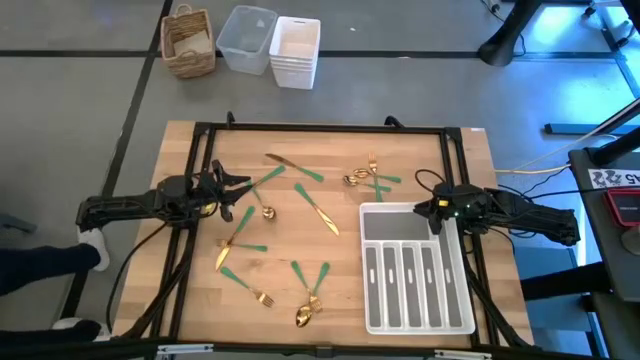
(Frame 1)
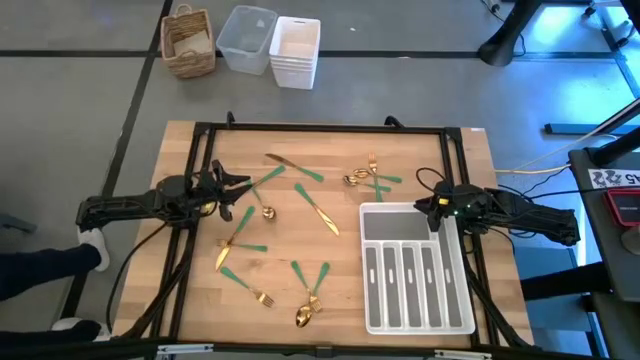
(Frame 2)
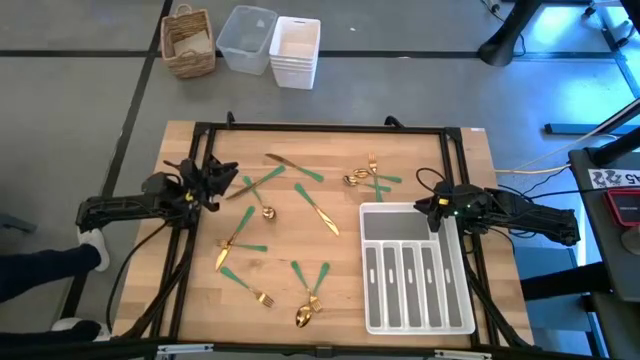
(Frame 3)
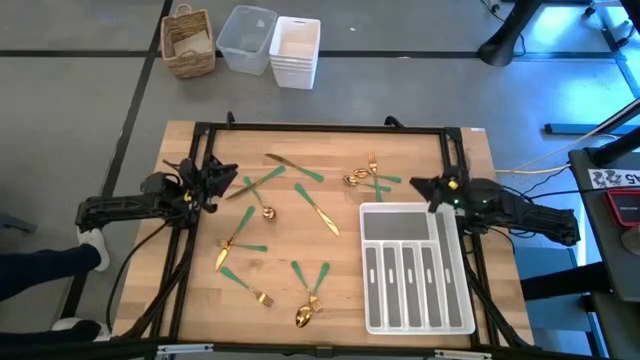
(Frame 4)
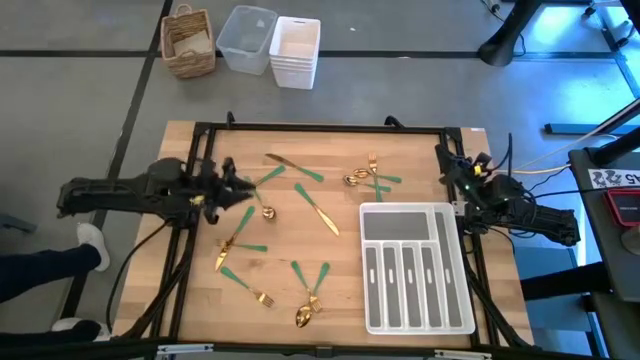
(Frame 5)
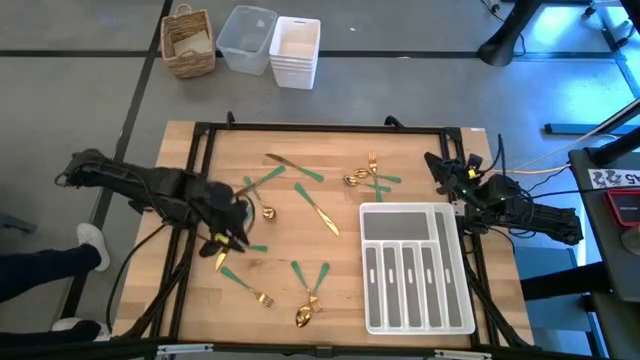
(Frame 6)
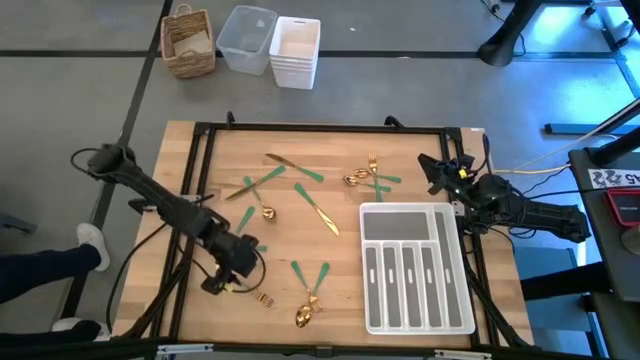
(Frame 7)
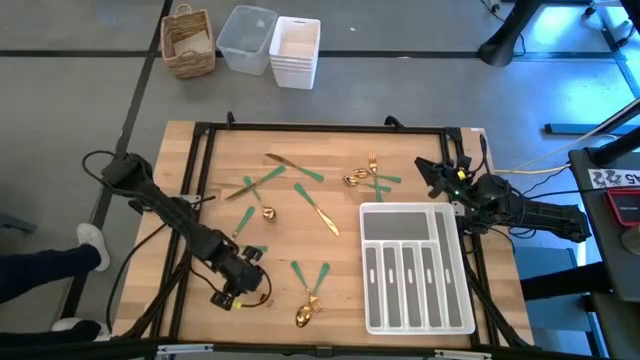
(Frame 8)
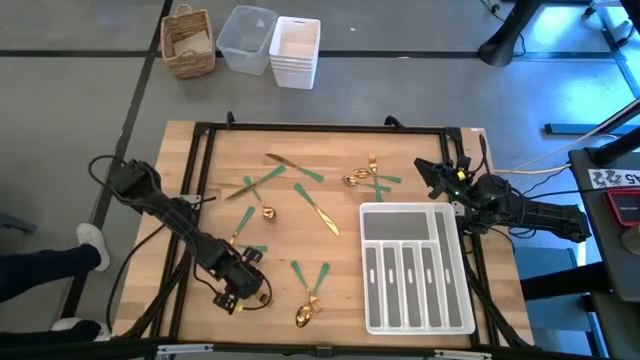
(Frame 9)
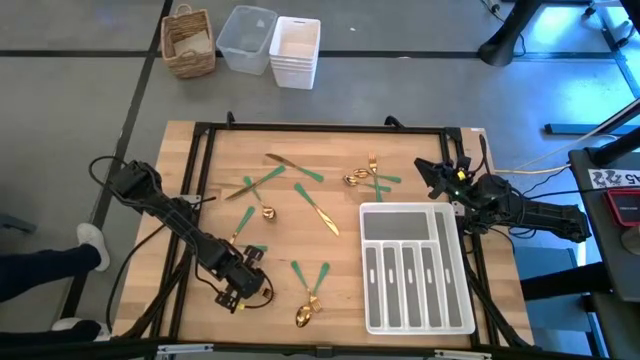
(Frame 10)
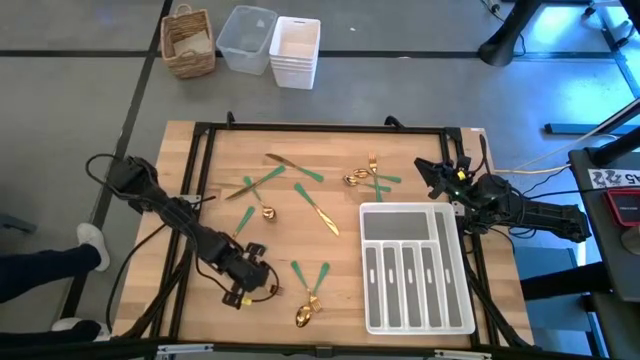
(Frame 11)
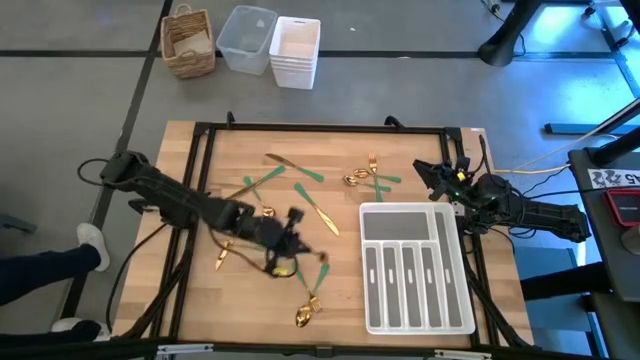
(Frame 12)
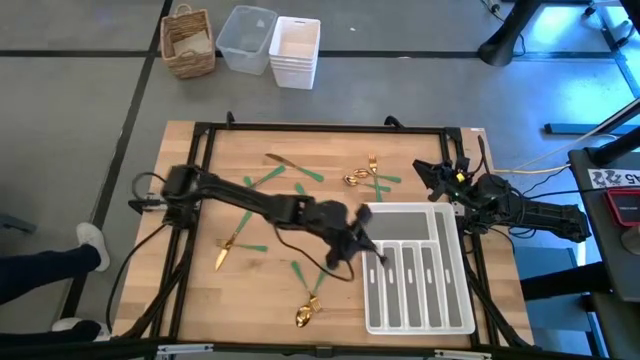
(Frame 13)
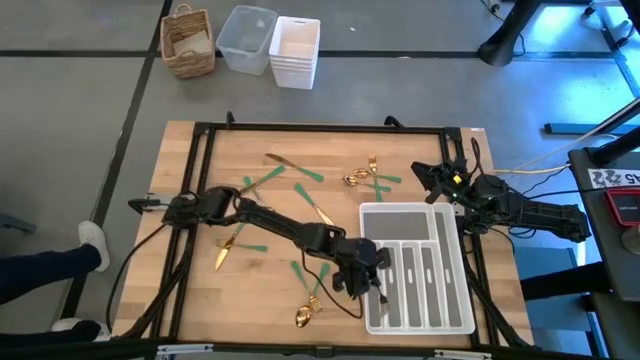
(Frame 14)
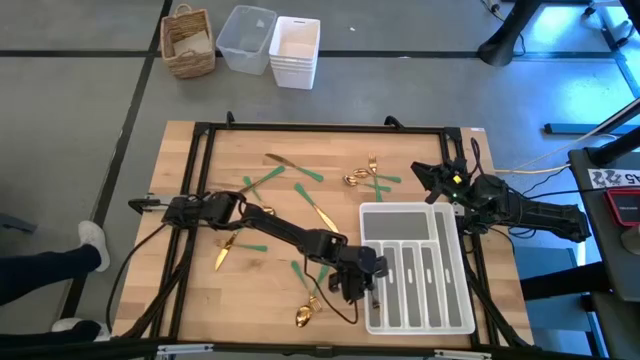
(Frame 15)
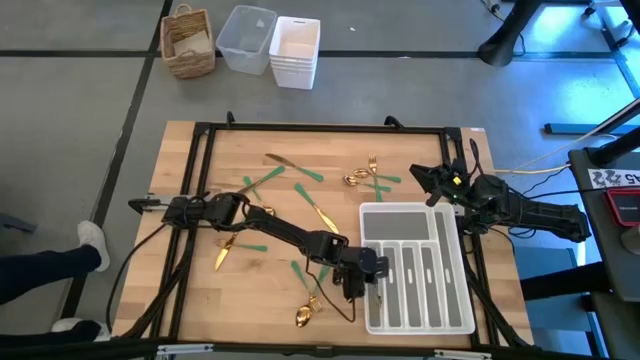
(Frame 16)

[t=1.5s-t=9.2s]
Task: Sort silverware
Put the green fork in the white silverware tray

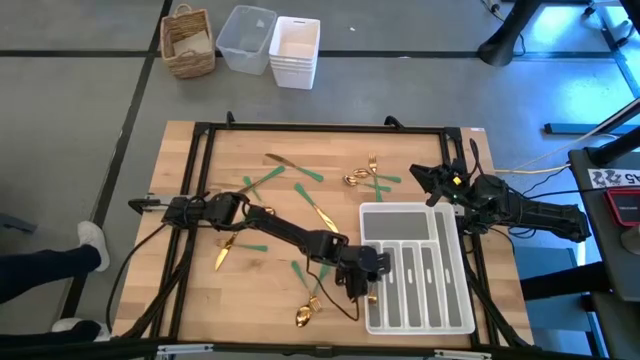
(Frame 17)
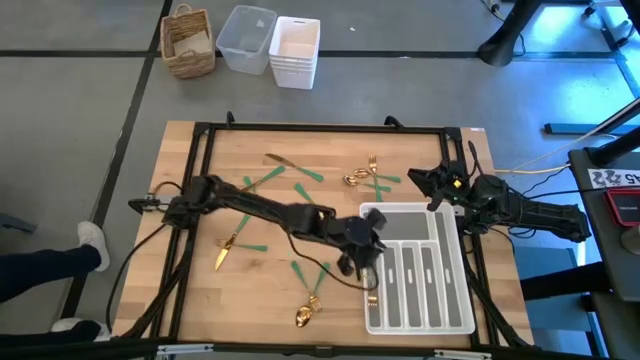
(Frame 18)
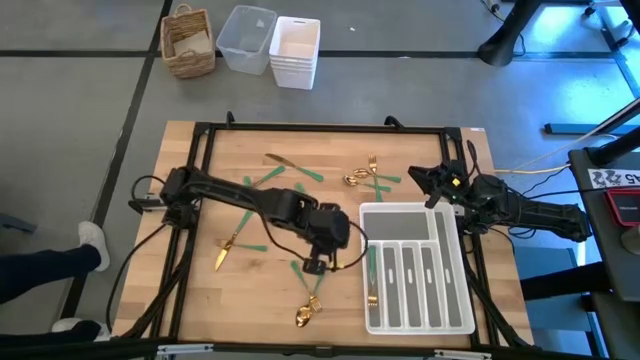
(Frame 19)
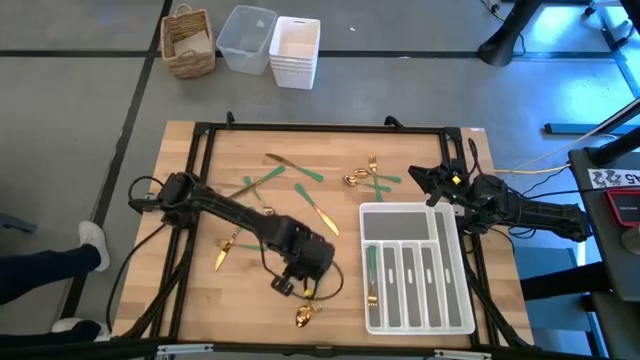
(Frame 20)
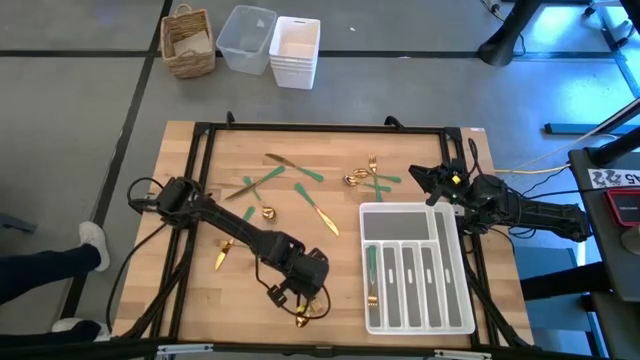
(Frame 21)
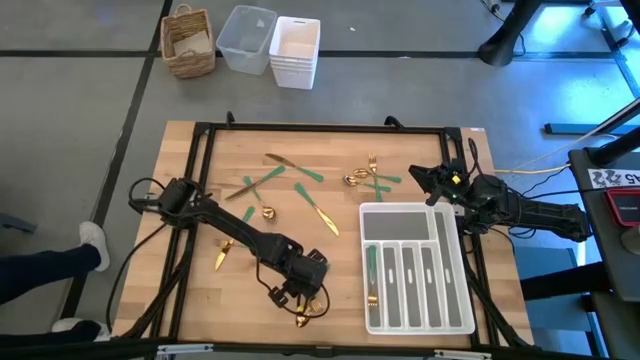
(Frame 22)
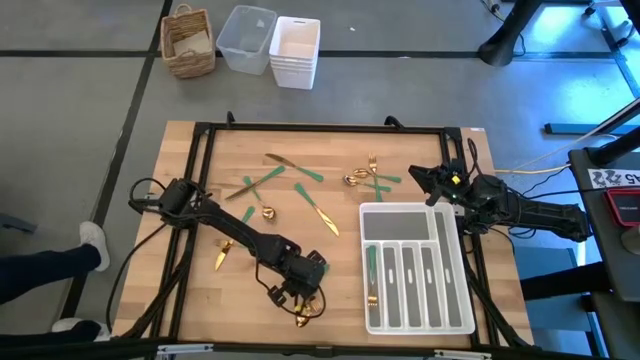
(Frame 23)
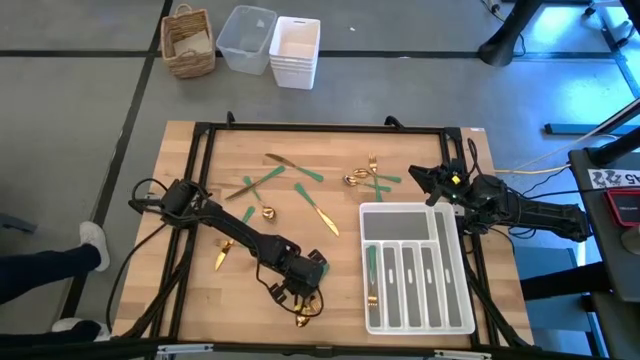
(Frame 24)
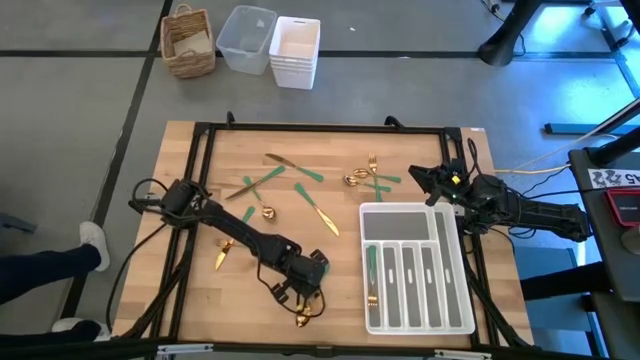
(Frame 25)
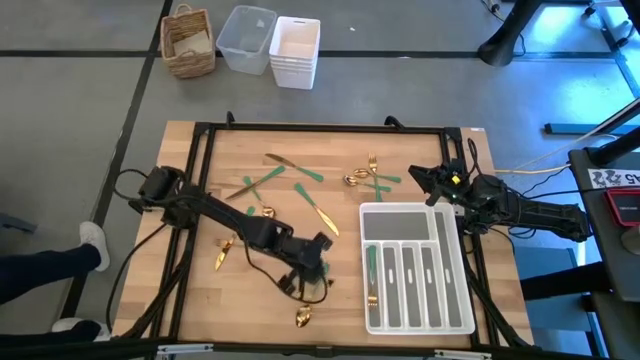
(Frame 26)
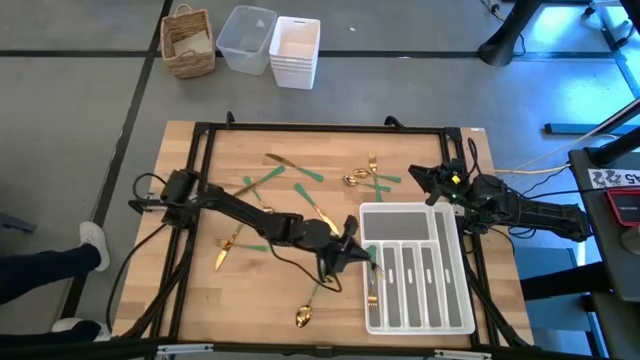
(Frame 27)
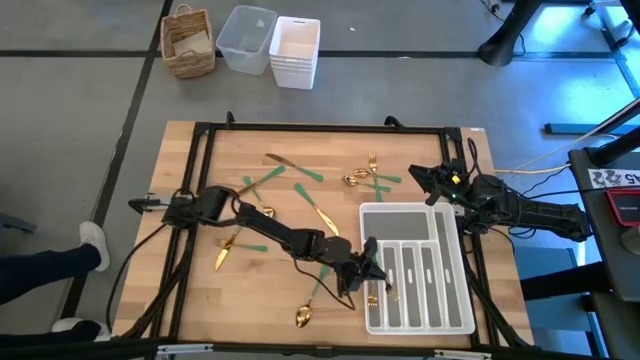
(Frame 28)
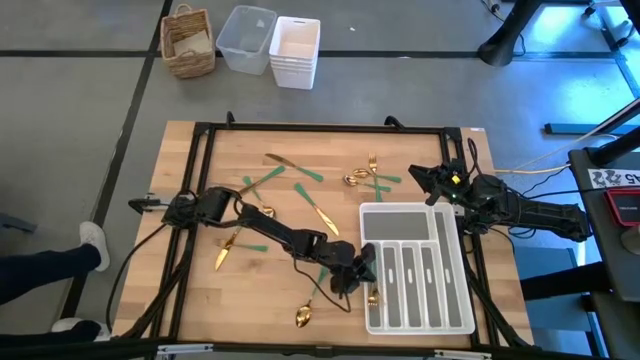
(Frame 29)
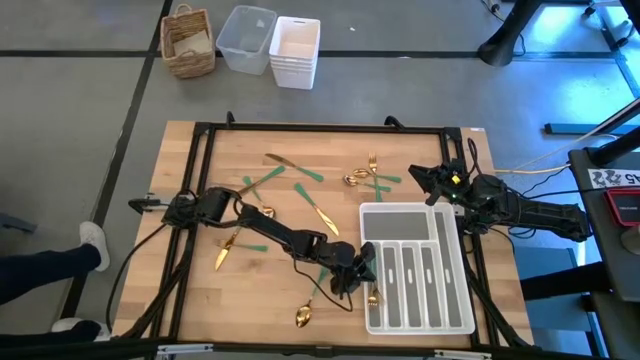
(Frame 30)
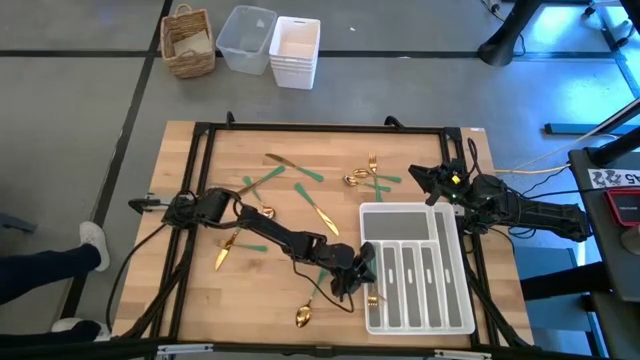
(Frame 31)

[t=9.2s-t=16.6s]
Put the green fork in the white silverware tray

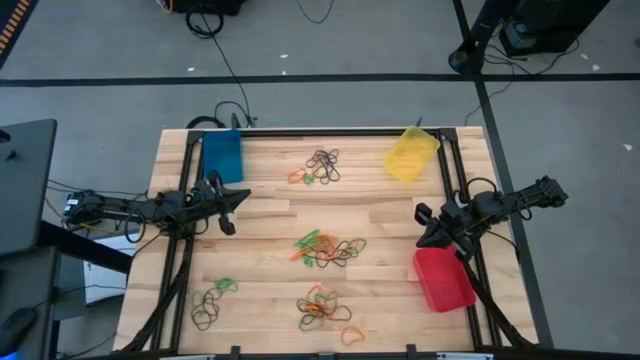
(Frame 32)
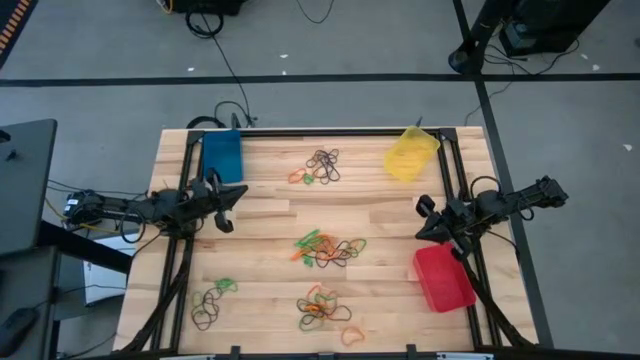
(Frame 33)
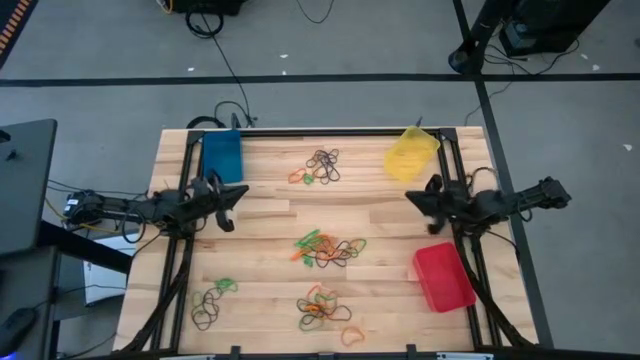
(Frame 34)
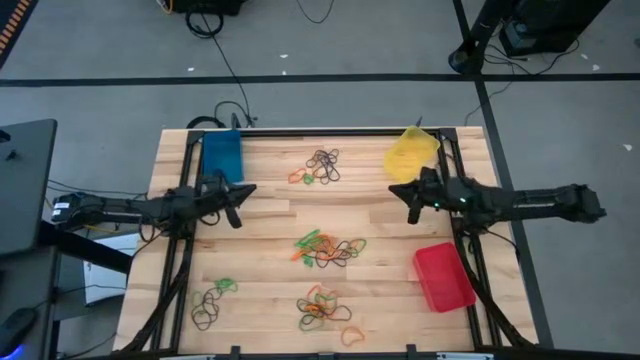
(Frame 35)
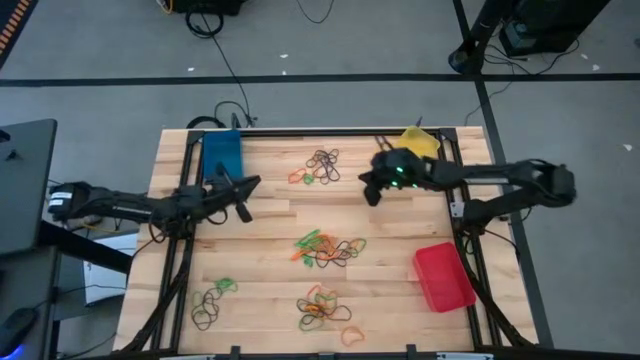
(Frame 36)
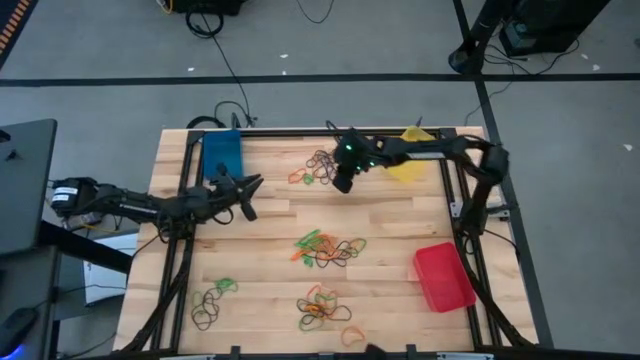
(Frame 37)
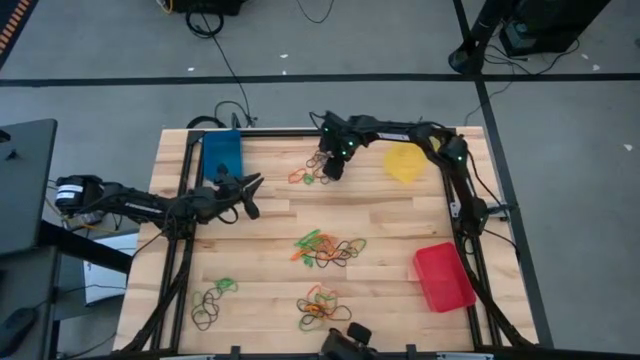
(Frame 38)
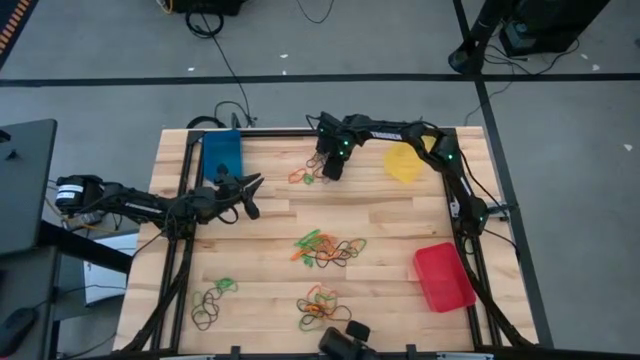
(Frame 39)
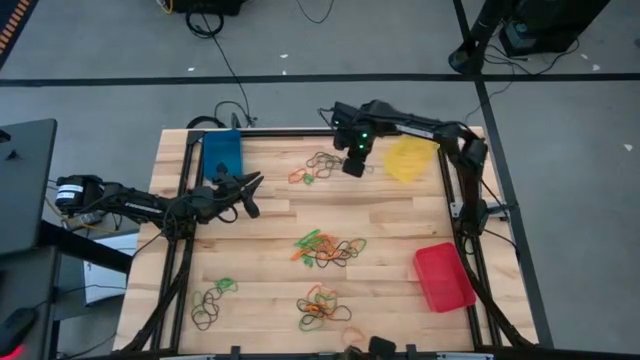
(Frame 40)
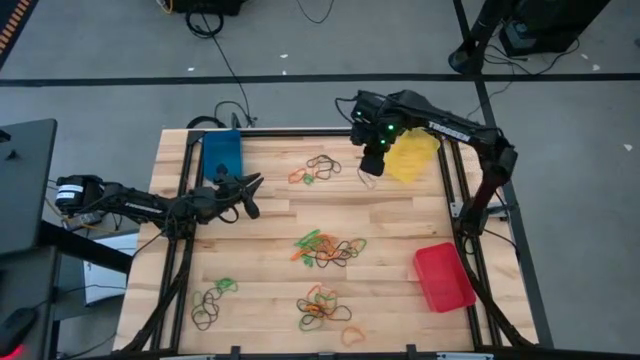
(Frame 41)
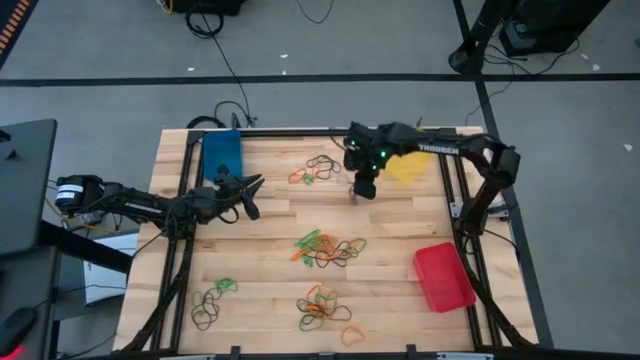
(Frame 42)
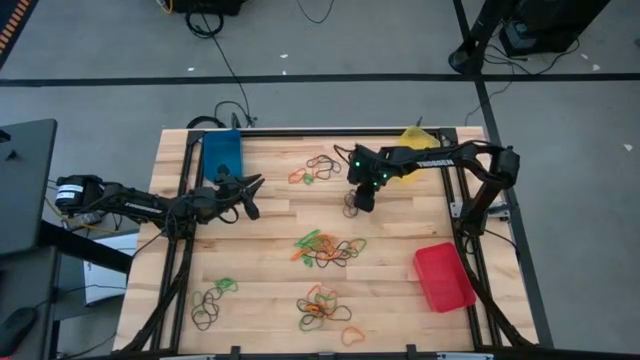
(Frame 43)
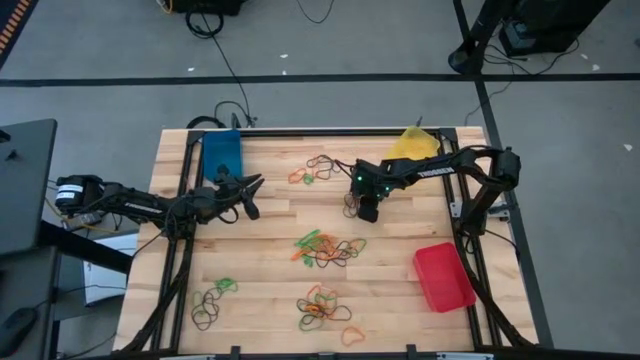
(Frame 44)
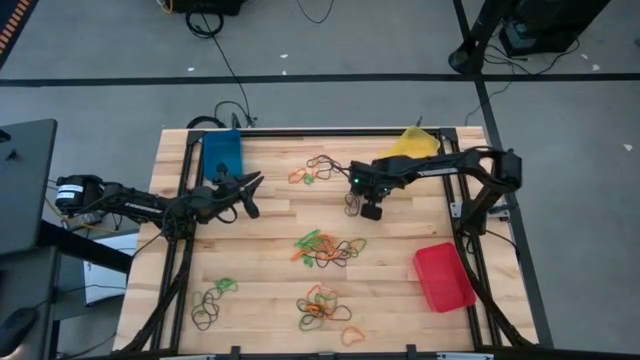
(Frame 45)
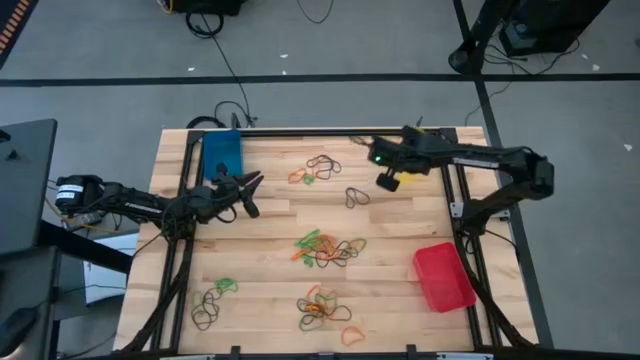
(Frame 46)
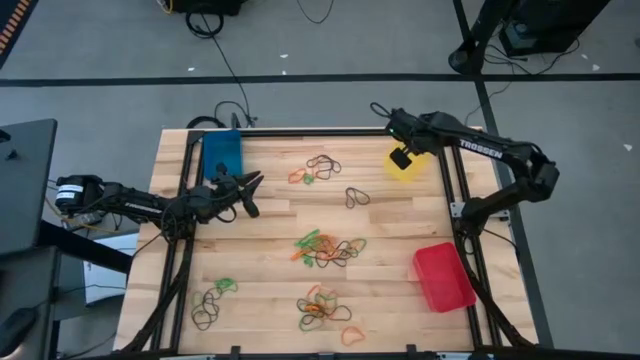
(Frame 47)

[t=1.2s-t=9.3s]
Task: Sort rubber bands into baskets
Put the brown rubber band into the yellow bin
